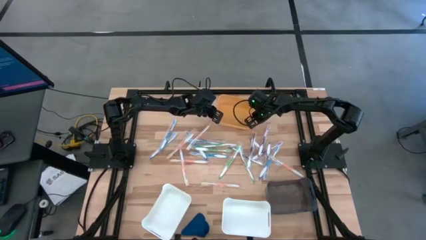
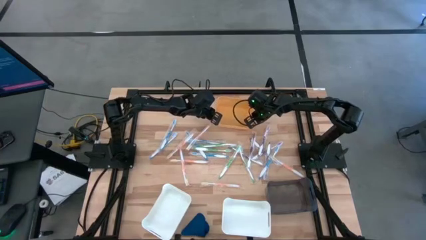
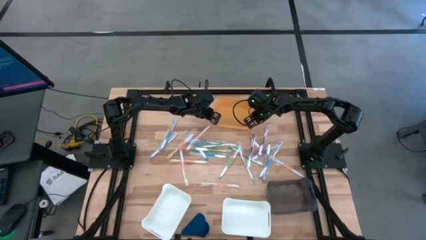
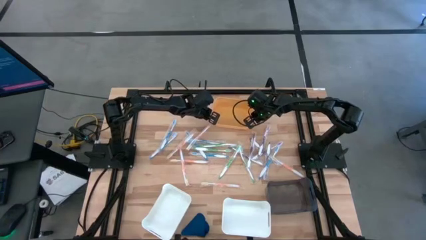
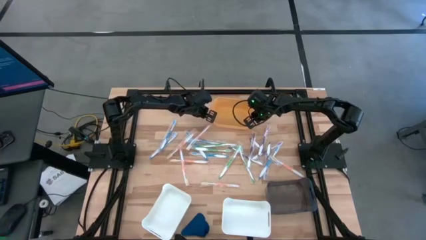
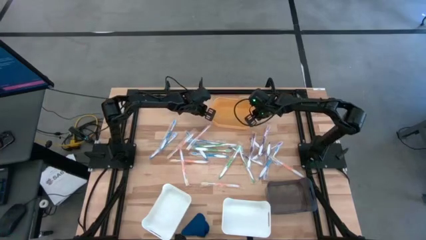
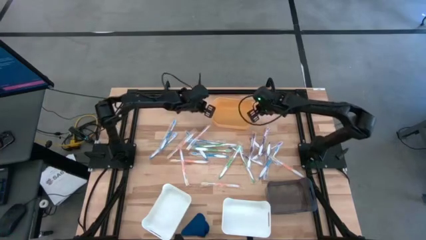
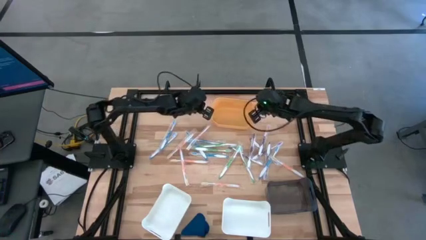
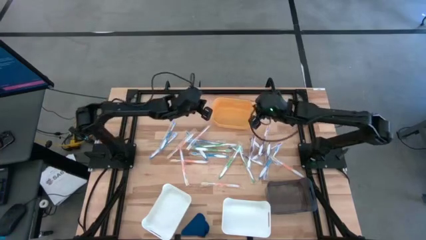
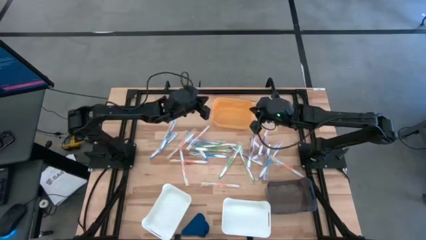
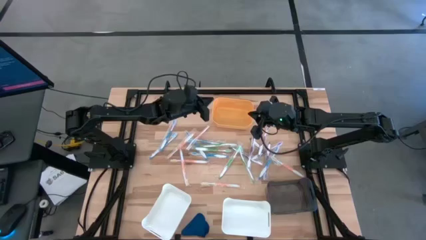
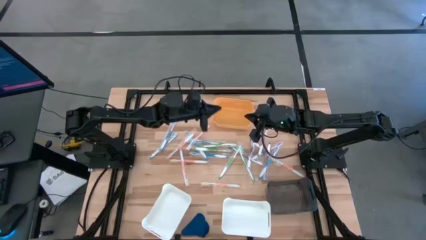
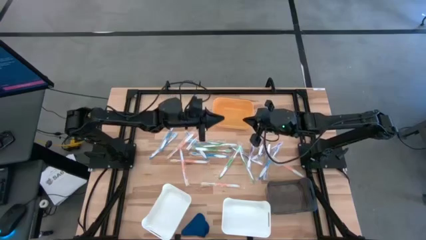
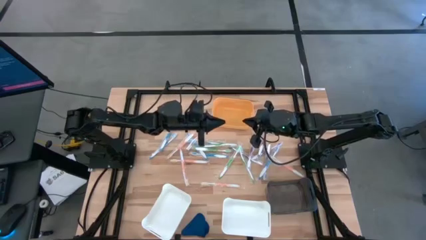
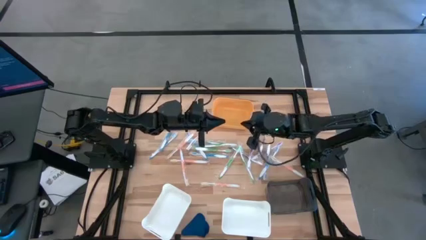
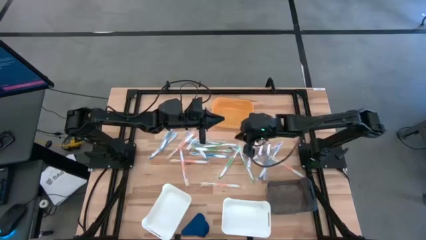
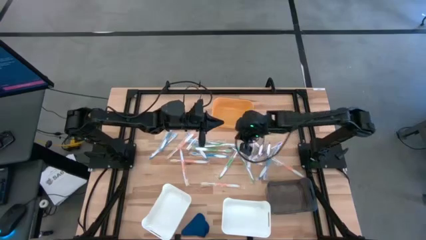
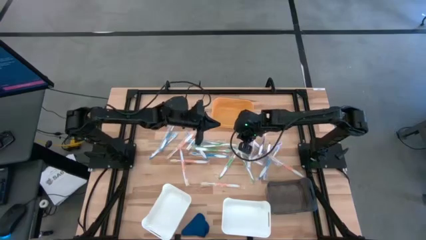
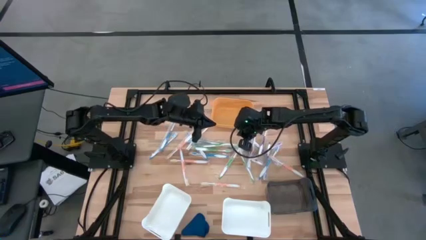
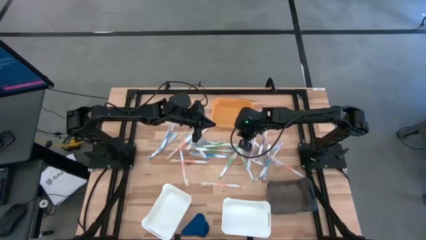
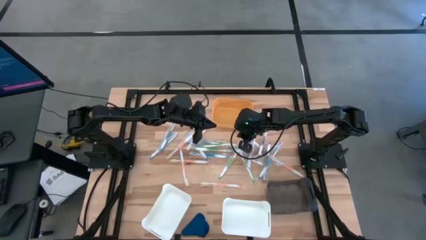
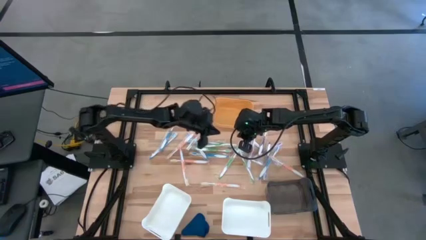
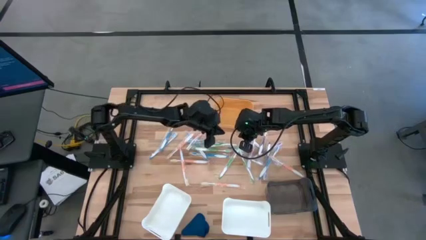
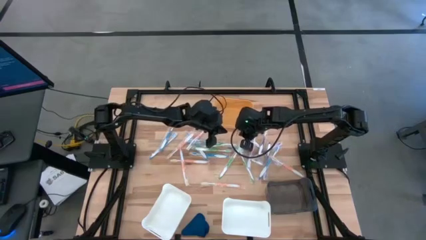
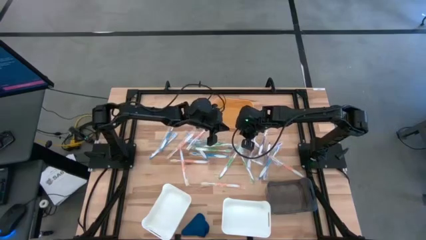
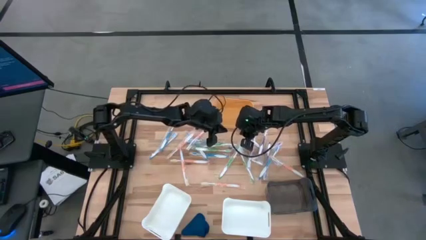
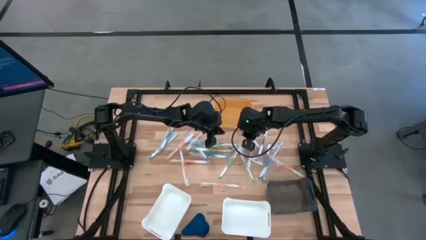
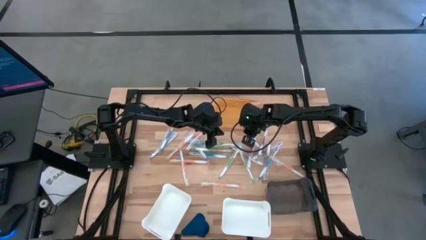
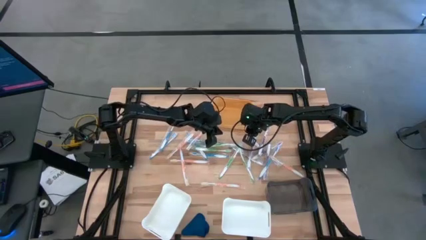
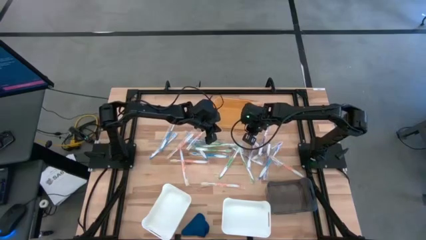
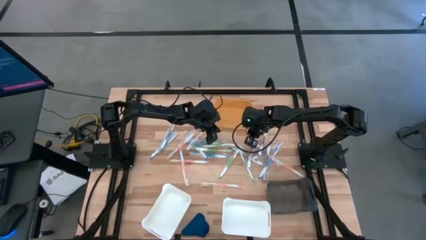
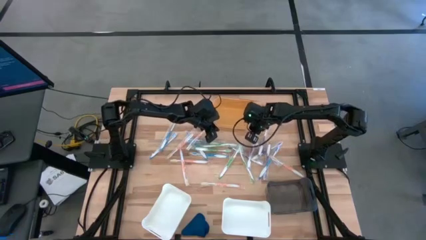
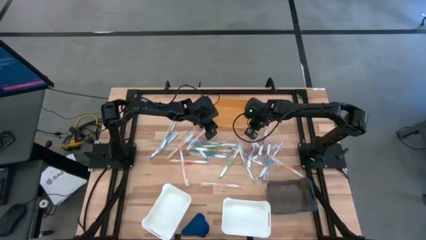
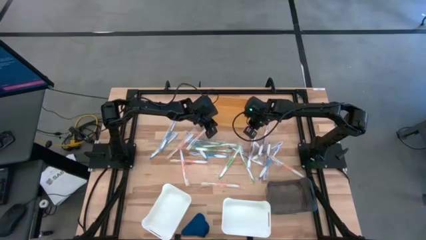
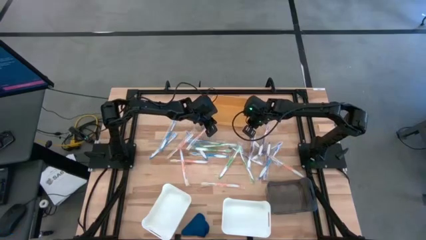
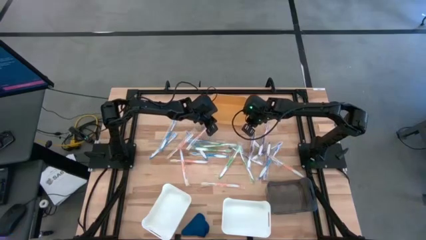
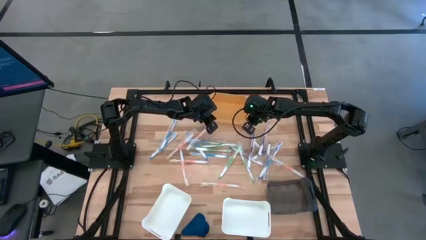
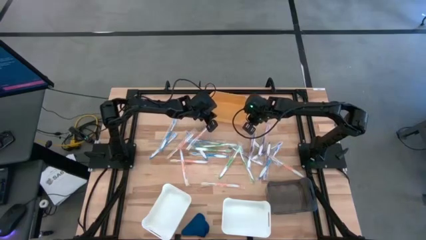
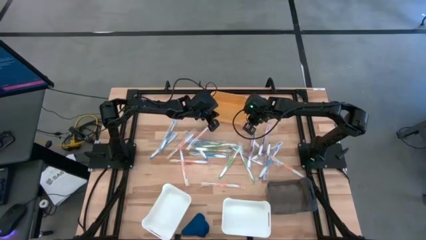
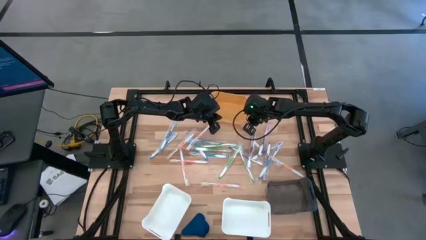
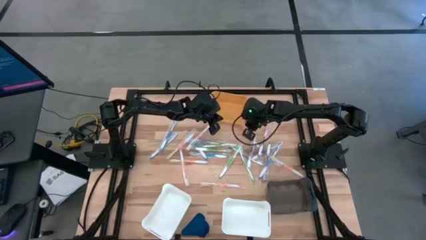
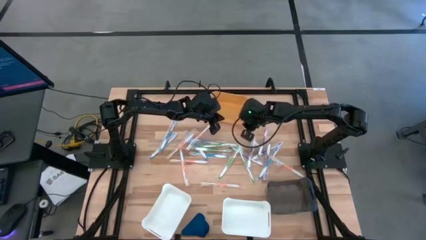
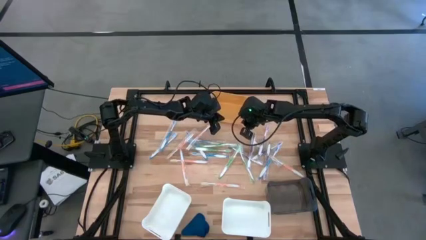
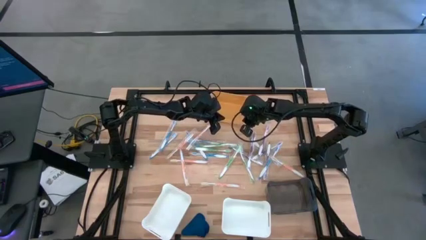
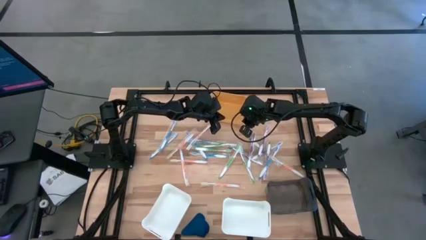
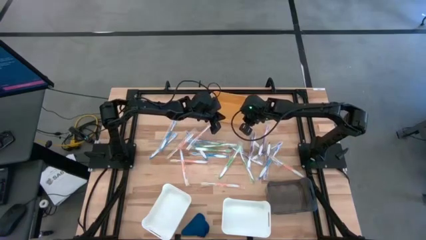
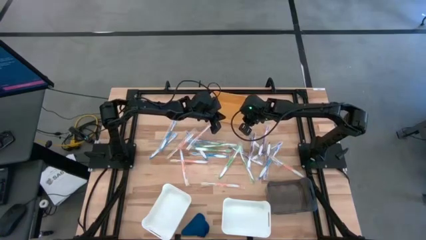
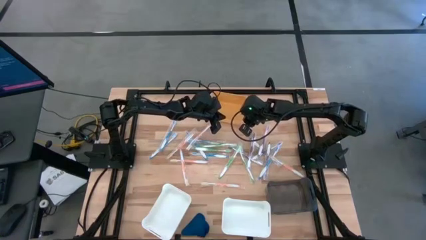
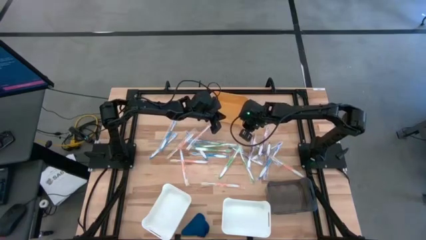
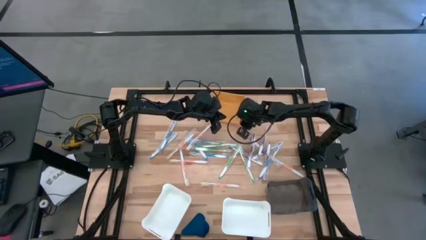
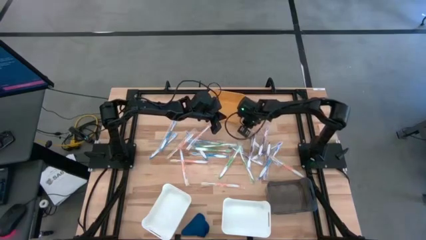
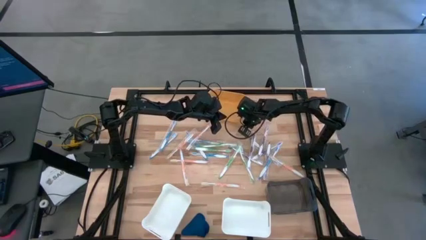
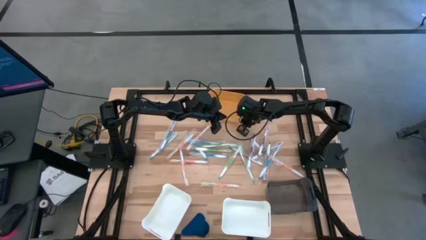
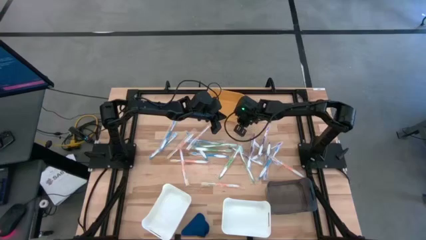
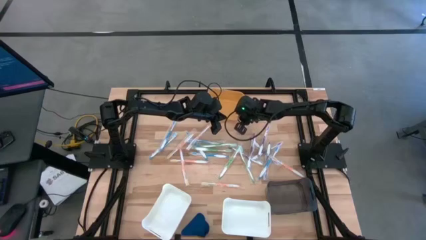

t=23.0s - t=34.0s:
Task: Pick & Place Toothbrushes
Move the yellow bin to the top center of the table

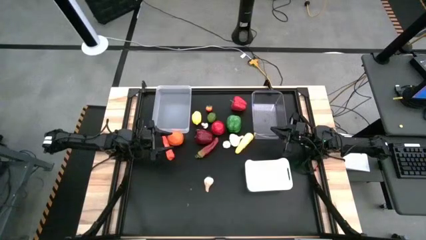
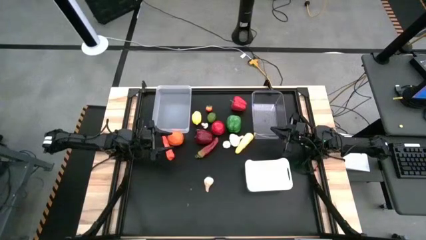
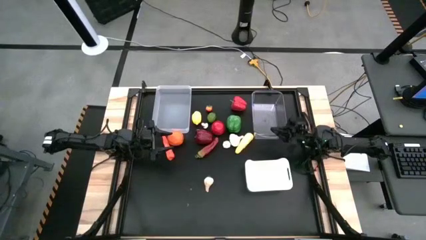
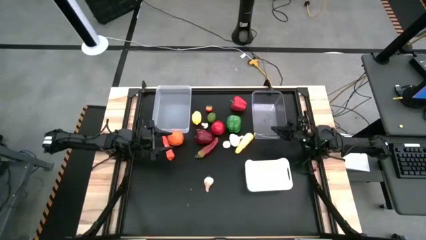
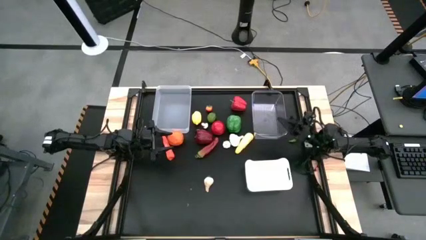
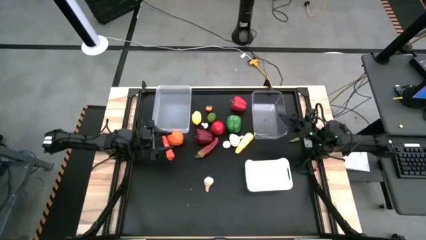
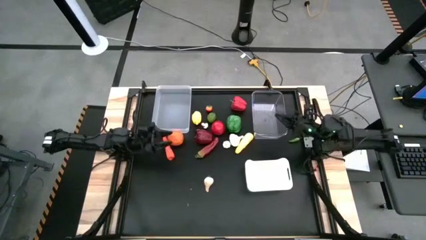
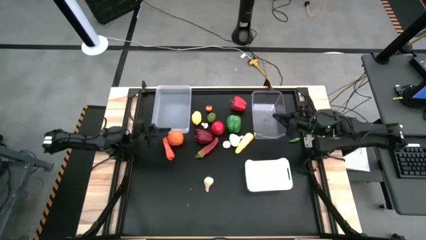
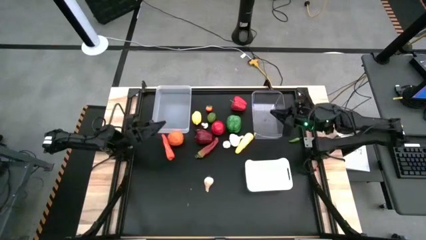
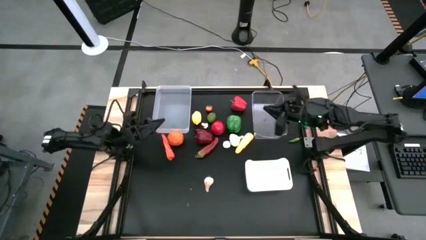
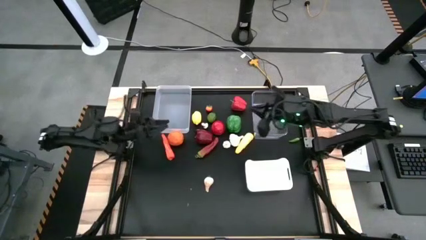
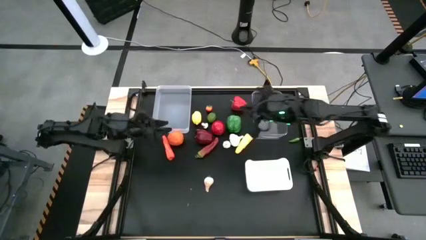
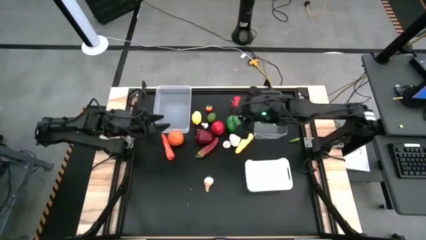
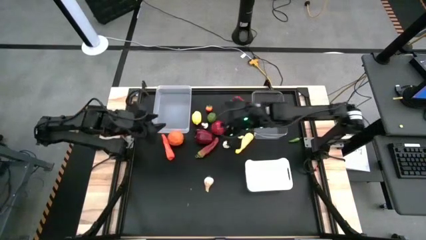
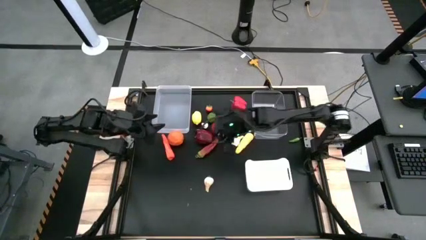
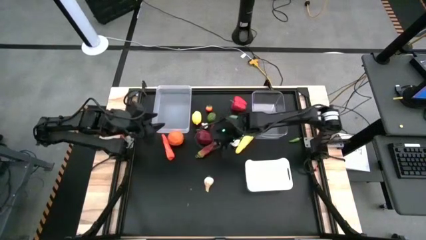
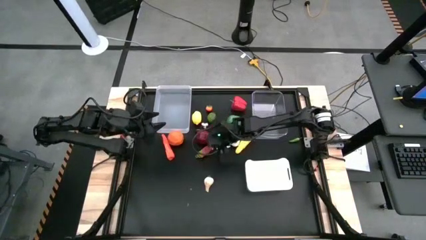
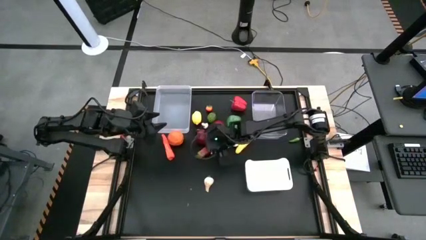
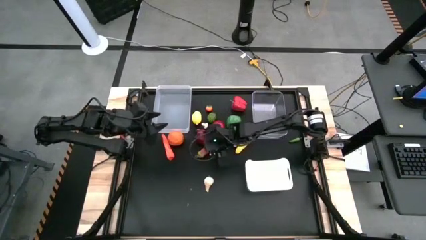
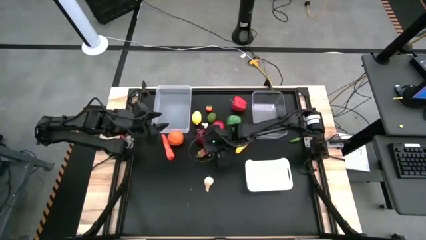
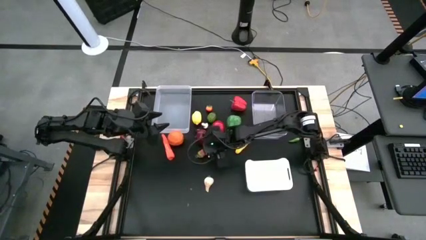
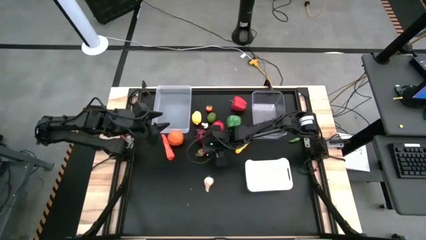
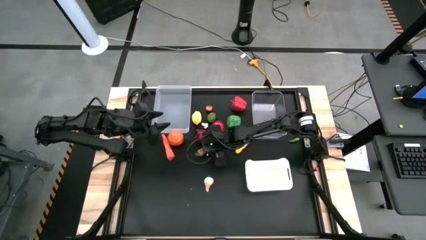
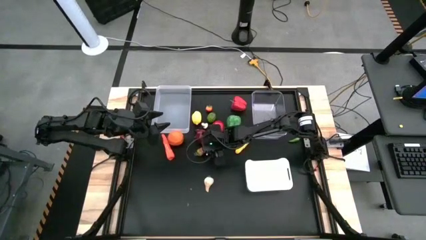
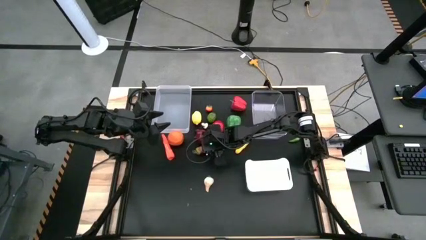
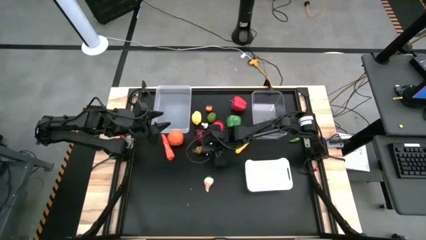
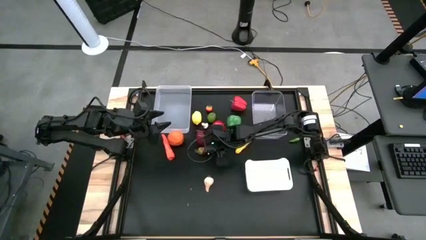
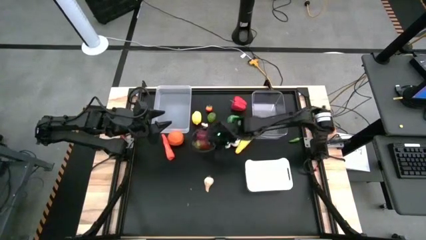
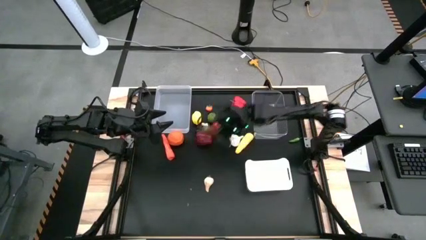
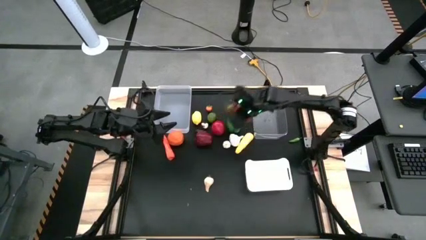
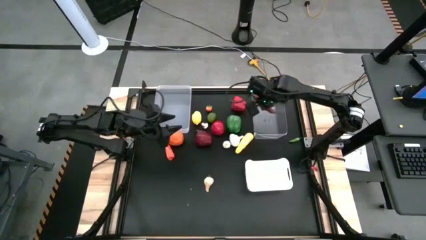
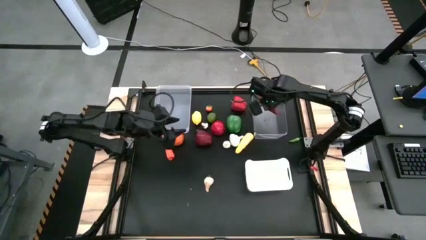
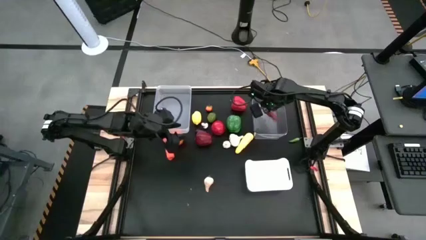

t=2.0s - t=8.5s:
Task: Sort produce into baskets
Put the red chili pepper into the transparent bin
